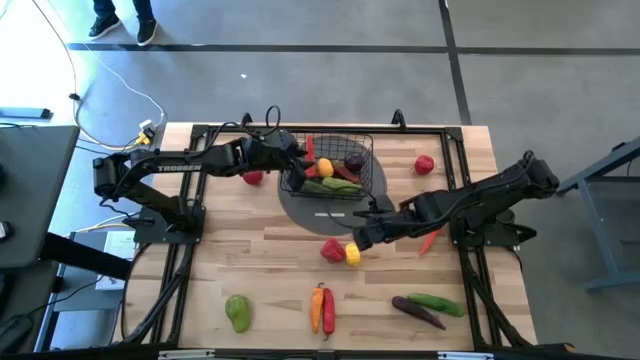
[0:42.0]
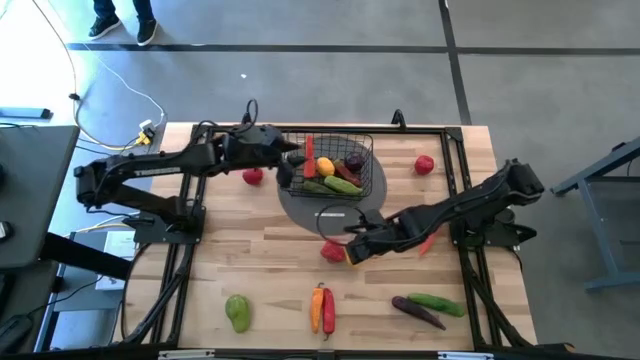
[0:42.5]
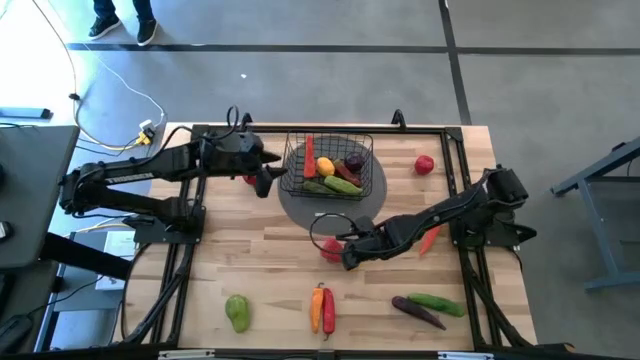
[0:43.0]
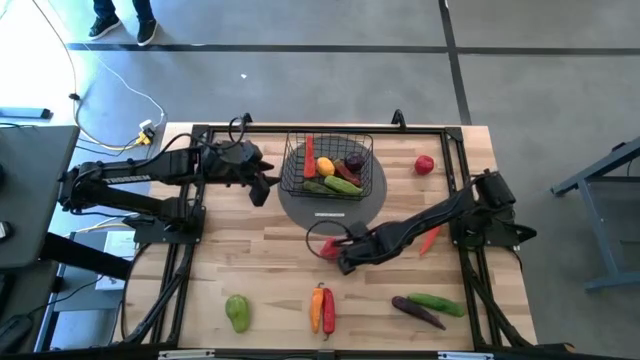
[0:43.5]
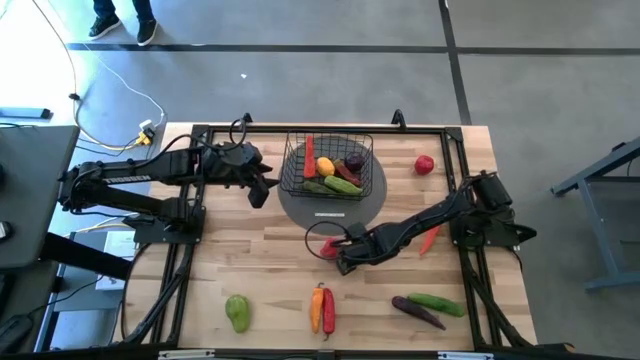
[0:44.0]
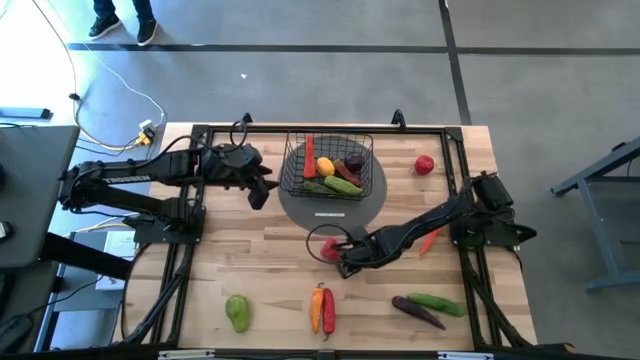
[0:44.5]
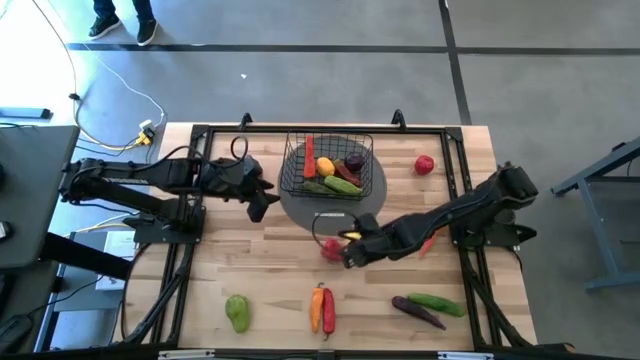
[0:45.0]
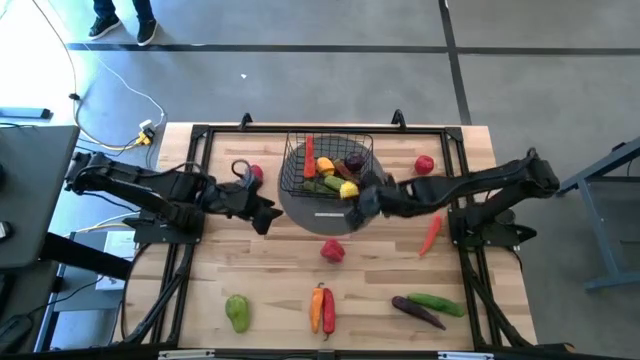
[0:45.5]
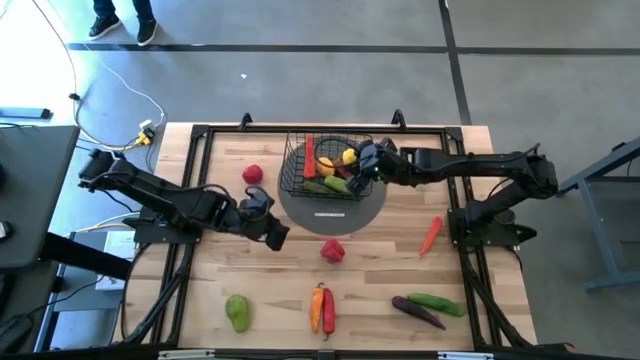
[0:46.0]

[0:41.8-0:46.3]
Task: Build produce basket
Put the lemon into the wire basket

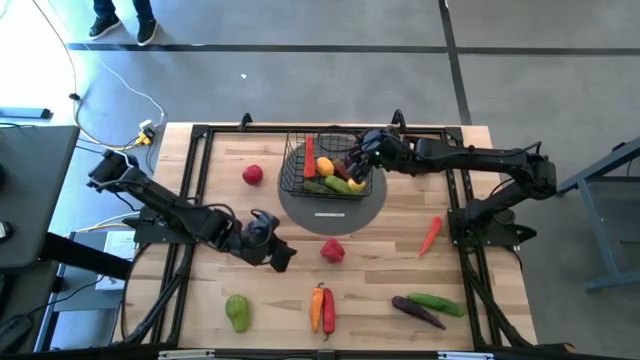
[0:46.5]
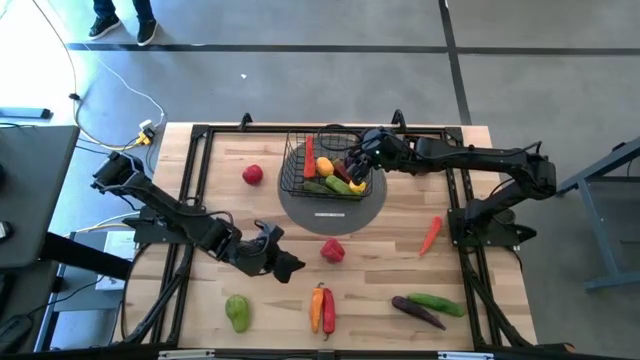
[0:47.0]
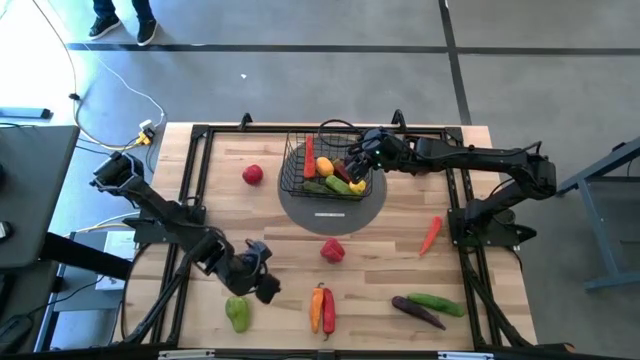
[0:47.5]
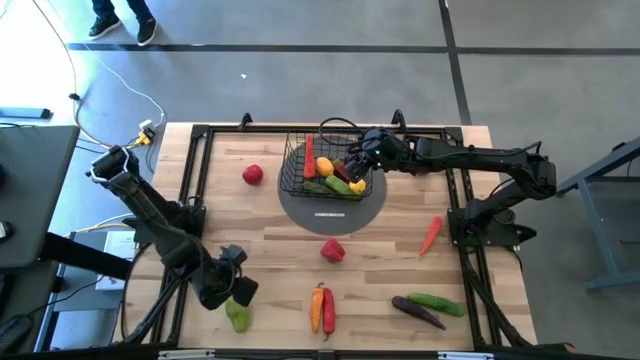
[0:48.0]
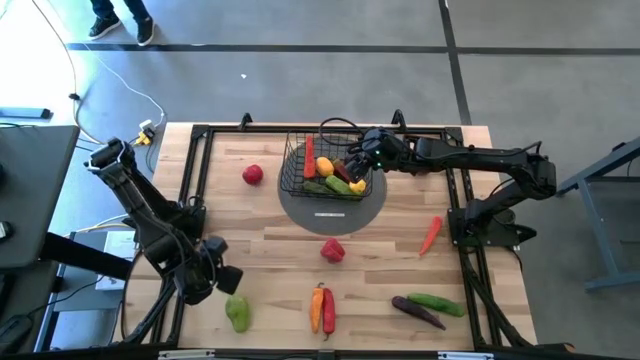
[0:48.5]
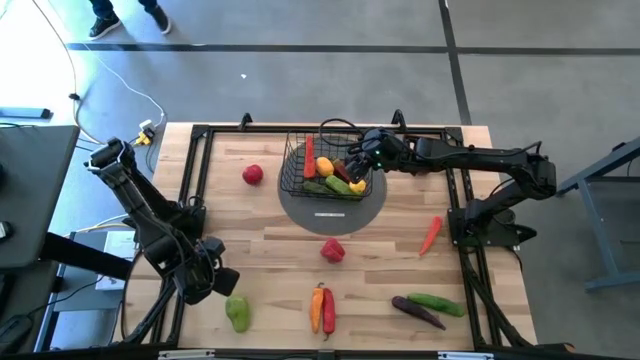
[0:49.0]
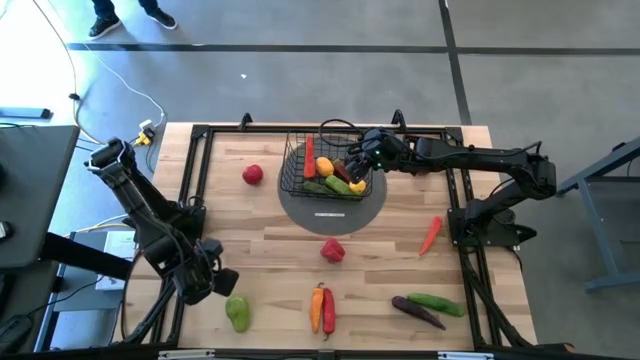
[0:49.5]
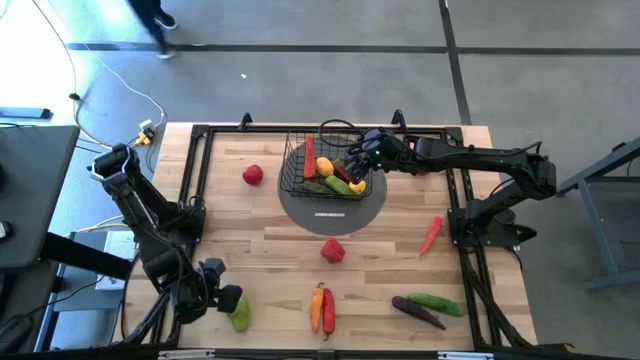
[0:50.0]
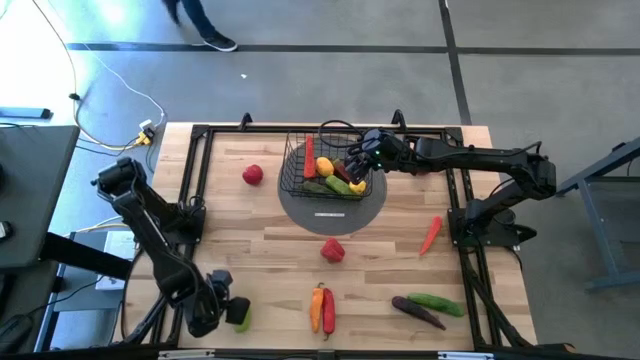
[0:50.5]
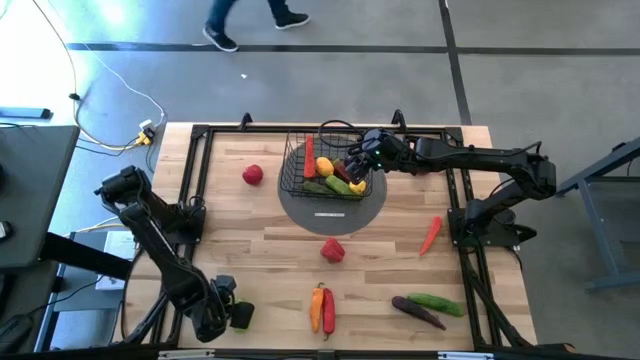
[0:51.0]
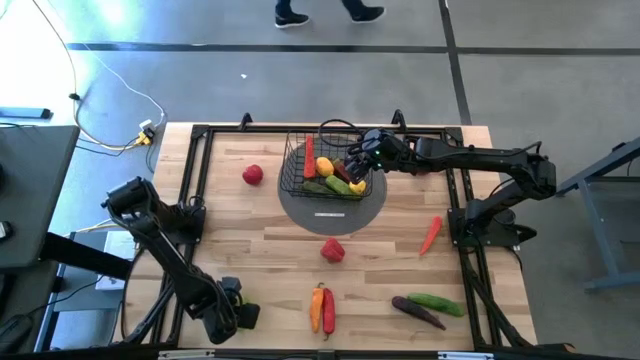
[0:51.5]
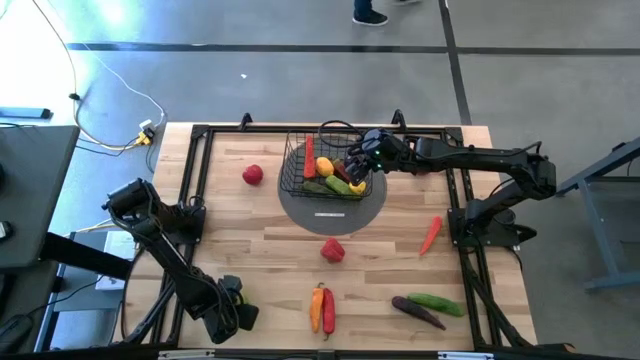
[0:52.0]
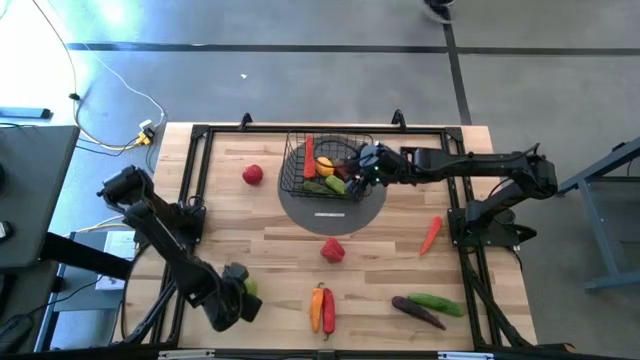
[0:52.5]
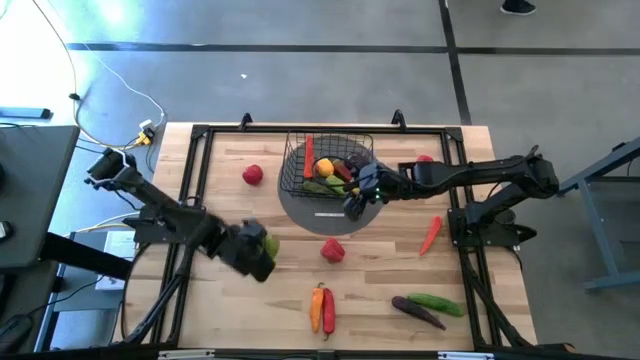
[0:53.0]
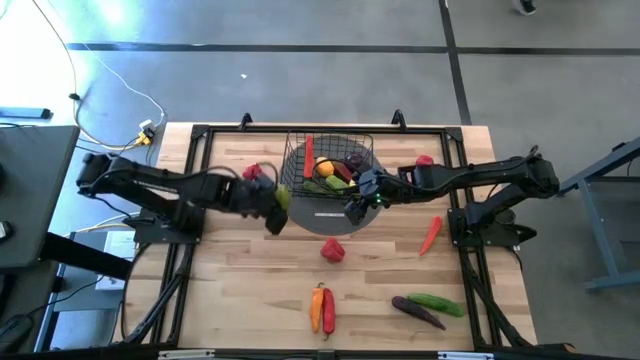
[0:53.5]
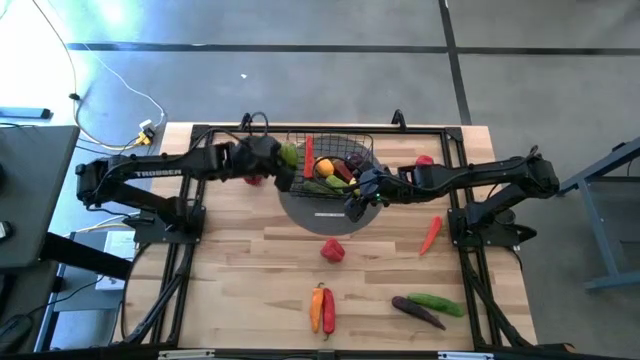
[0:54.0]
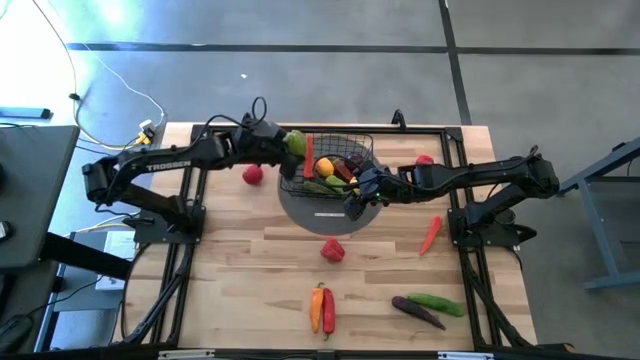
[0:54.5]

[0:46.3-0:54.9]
Put the chayote into the wire basket

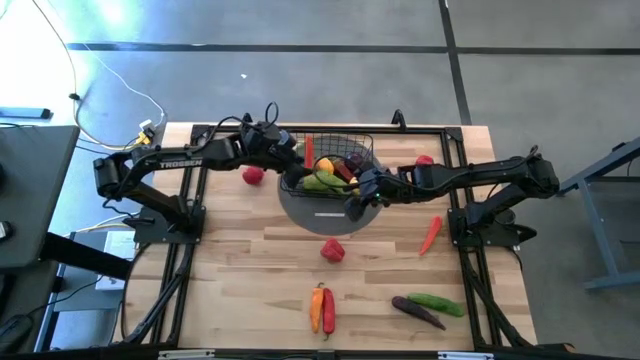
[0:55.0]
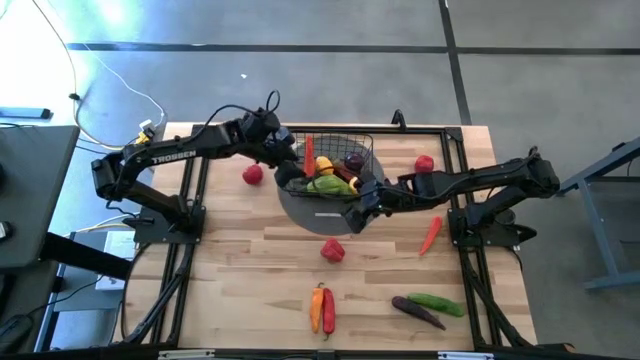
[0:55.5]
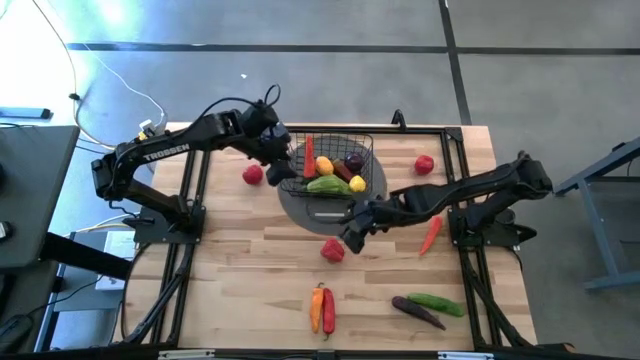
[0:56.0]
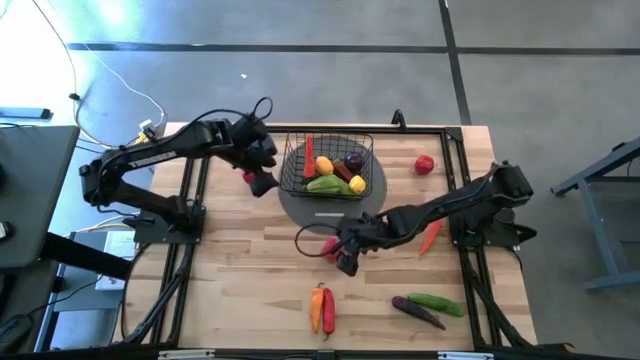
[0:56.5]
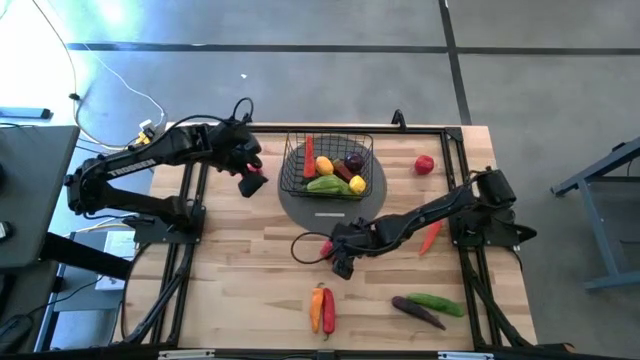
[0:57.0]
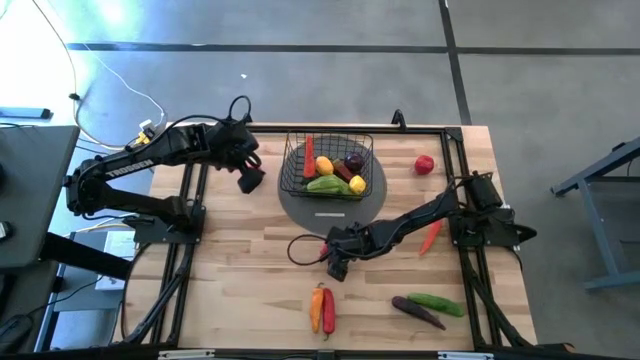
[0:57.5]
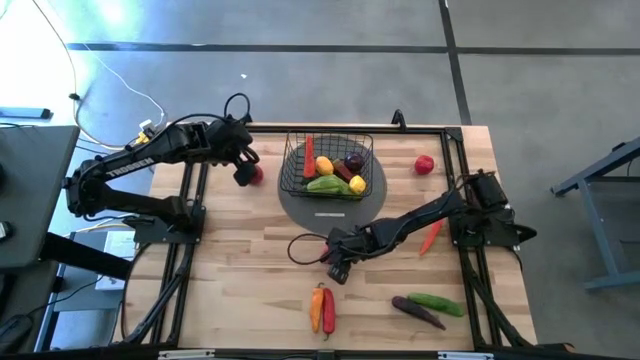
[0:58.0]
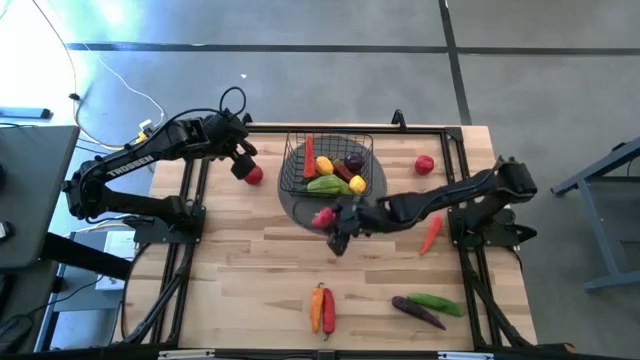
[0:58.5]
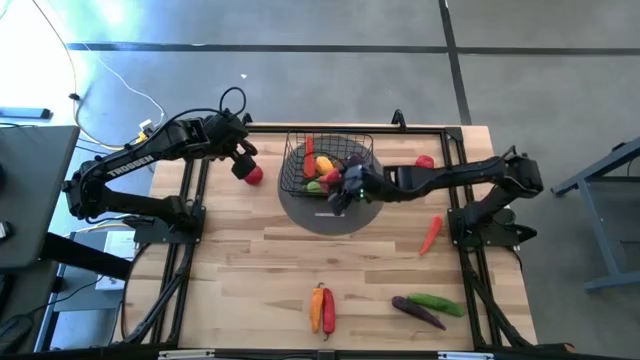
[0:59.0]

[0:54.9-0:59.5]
Put the red bell pepper into the wire basket

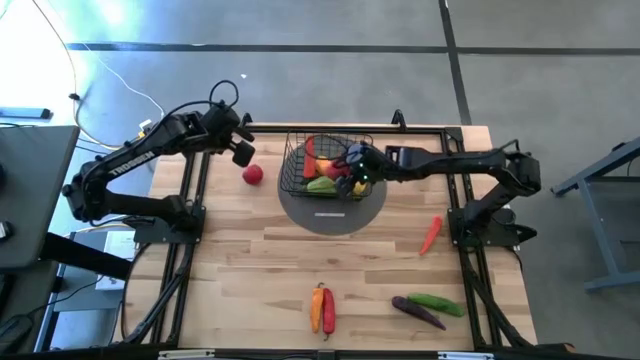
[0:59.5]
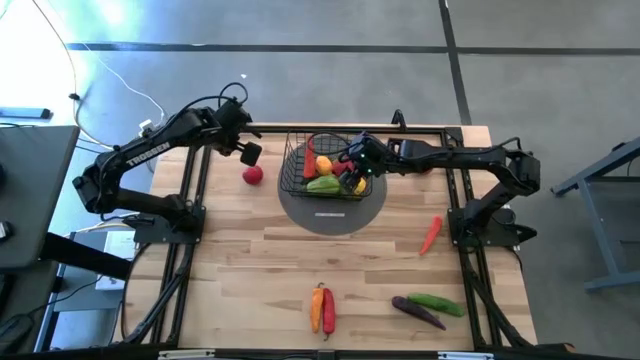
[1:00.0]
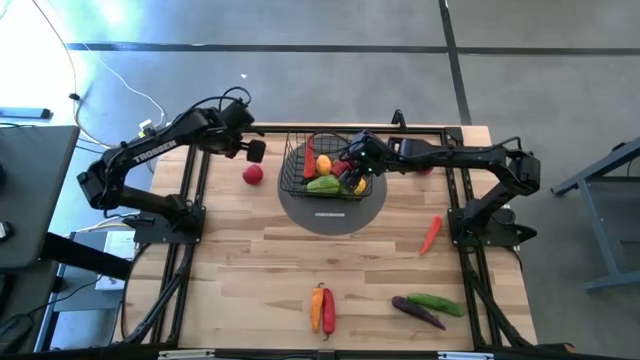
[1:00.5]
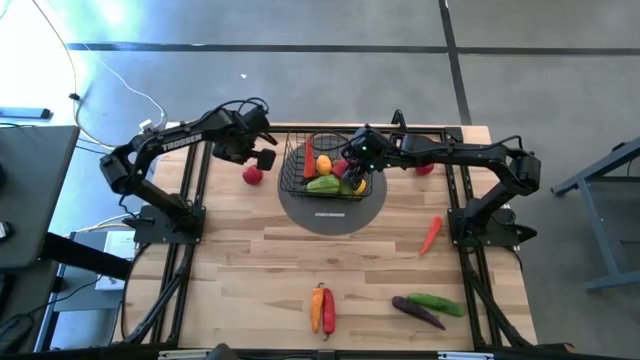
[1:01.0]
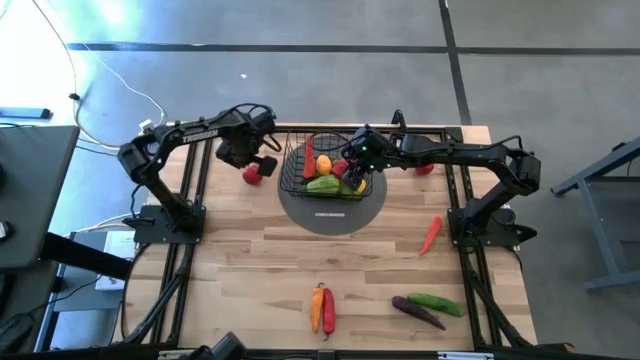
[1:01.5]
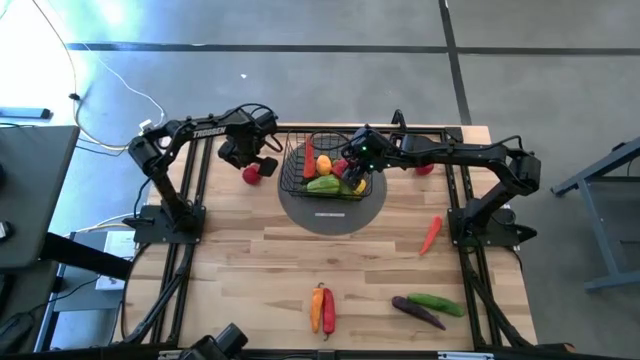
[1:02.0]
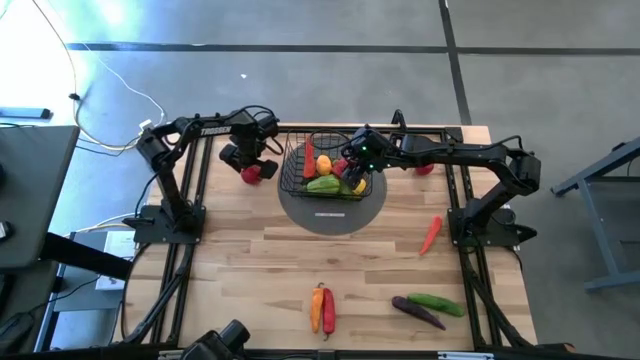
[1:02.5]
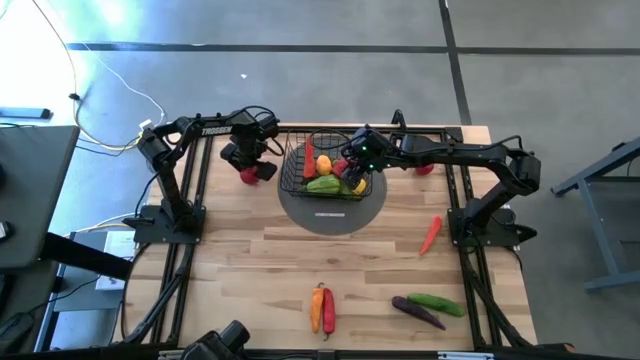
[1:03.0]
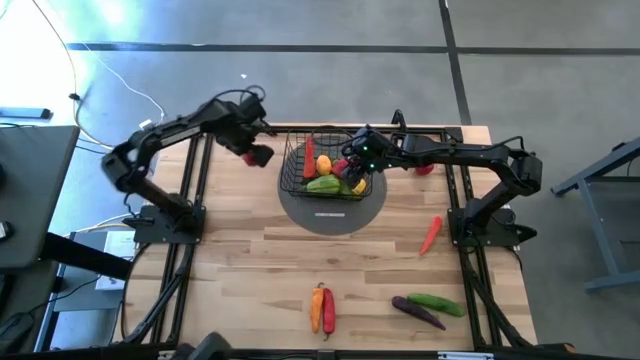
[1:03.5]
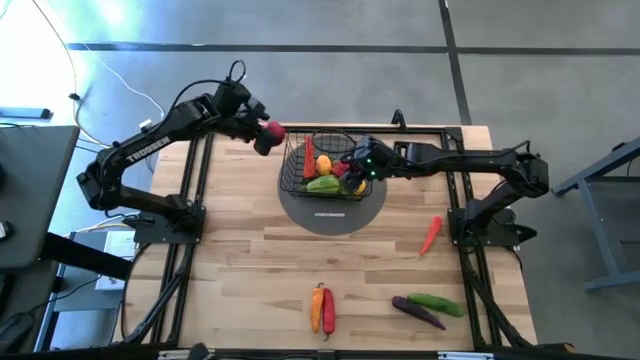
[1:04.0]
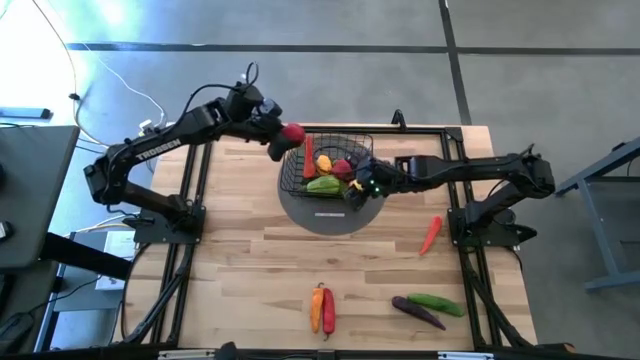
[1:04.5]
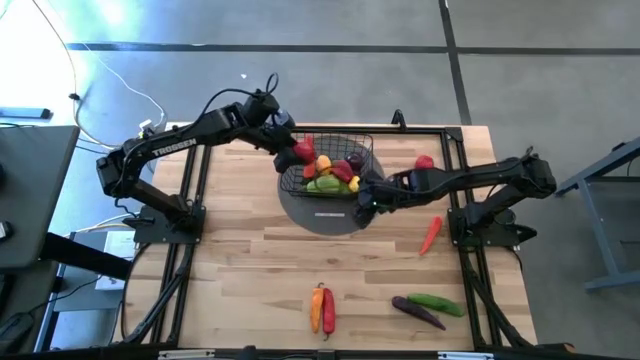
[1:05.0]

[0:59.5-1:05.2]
Put the left tomato into the wire basket
